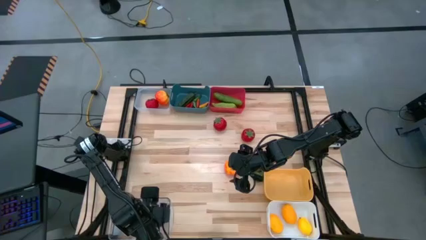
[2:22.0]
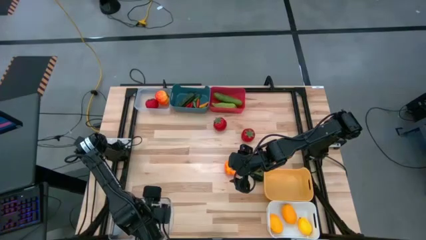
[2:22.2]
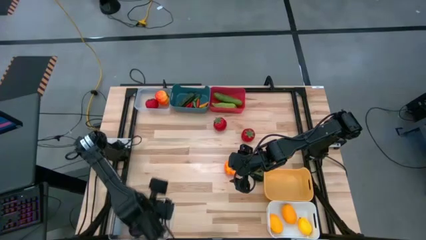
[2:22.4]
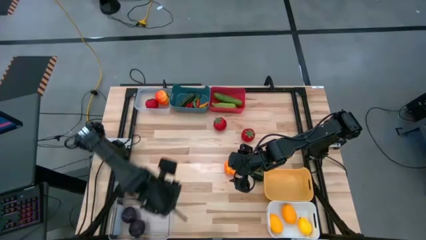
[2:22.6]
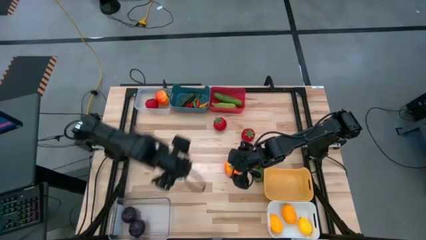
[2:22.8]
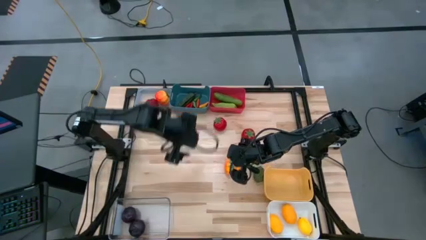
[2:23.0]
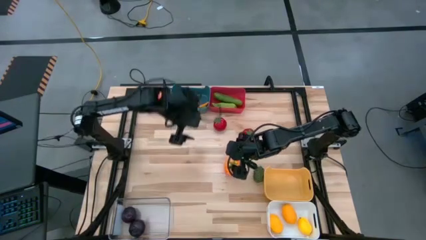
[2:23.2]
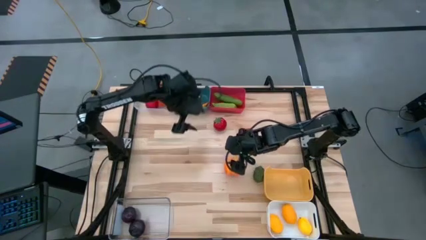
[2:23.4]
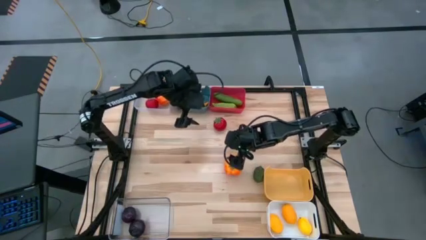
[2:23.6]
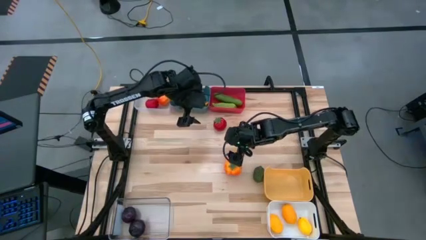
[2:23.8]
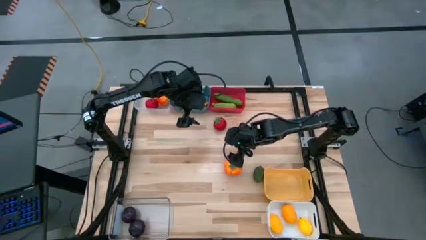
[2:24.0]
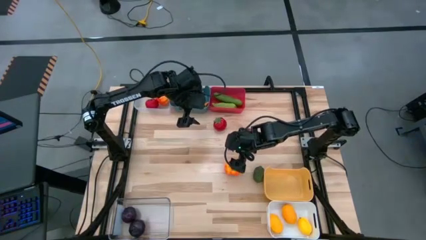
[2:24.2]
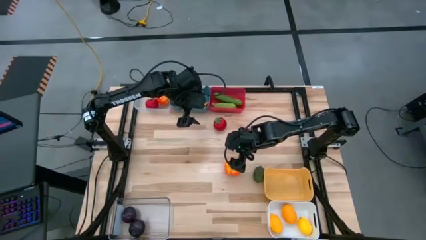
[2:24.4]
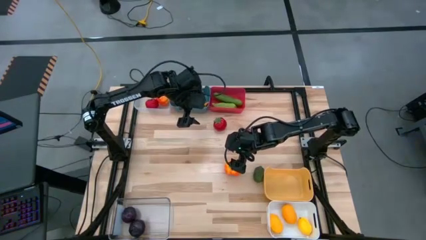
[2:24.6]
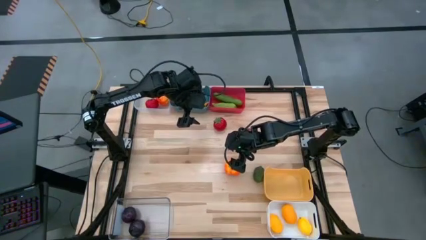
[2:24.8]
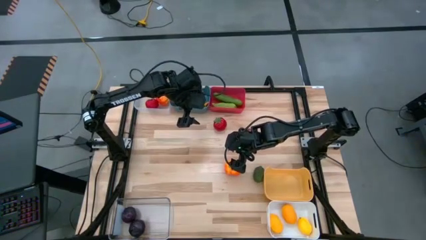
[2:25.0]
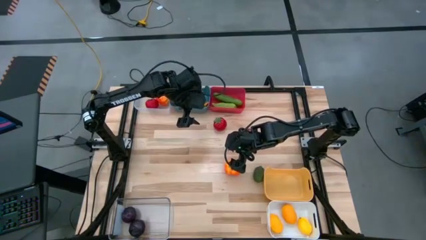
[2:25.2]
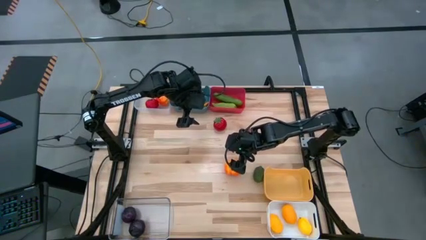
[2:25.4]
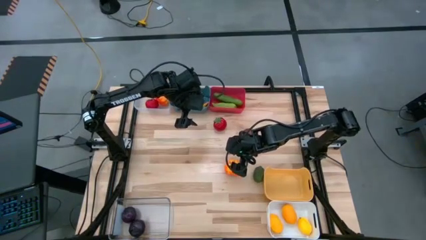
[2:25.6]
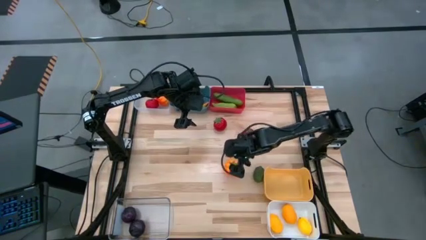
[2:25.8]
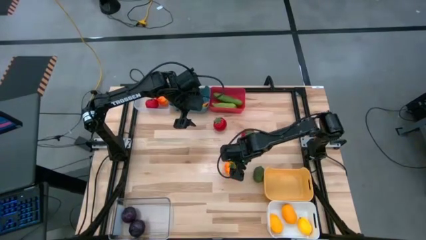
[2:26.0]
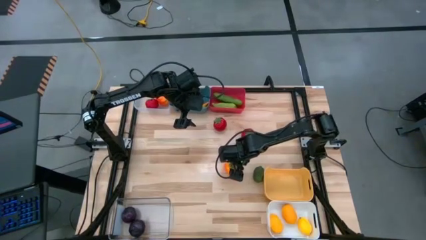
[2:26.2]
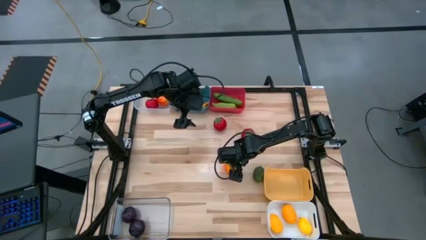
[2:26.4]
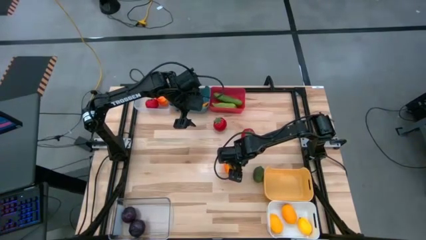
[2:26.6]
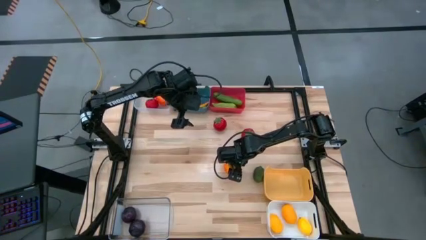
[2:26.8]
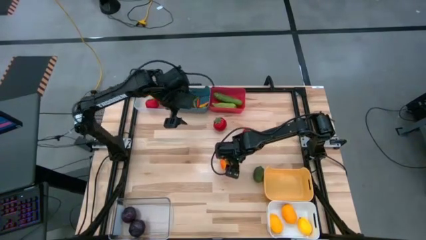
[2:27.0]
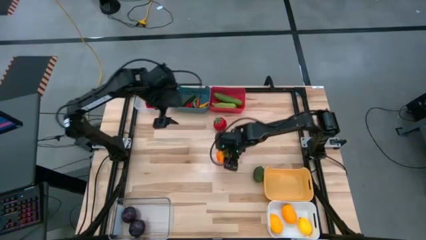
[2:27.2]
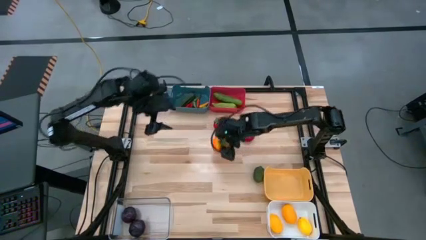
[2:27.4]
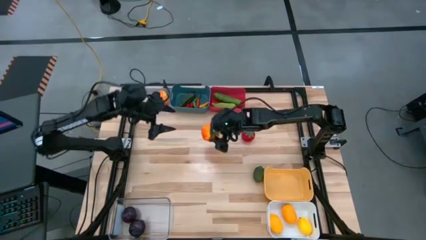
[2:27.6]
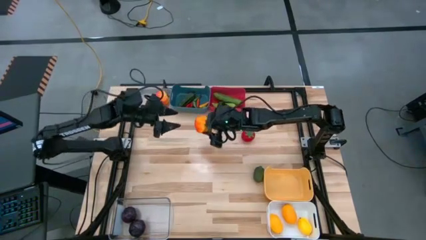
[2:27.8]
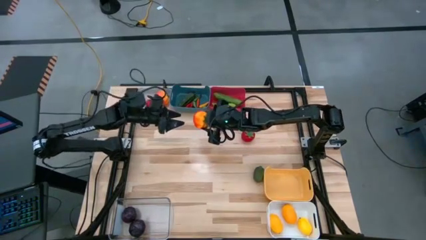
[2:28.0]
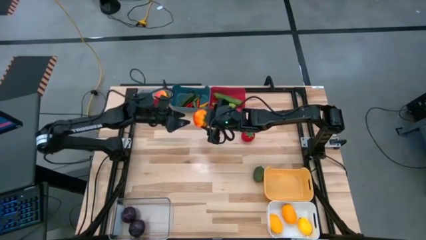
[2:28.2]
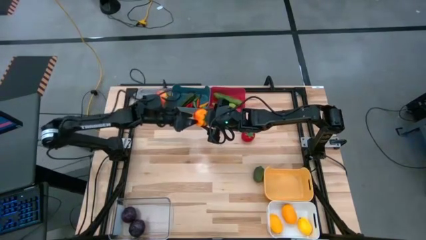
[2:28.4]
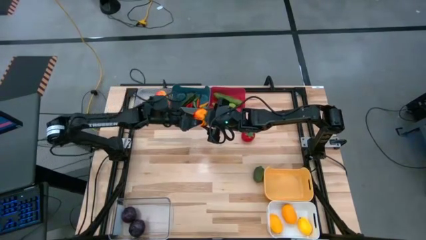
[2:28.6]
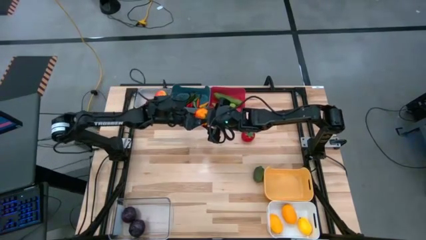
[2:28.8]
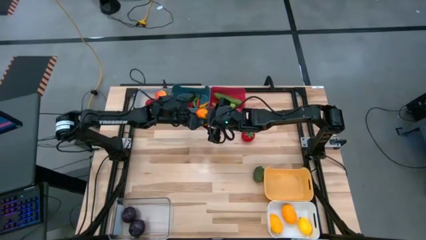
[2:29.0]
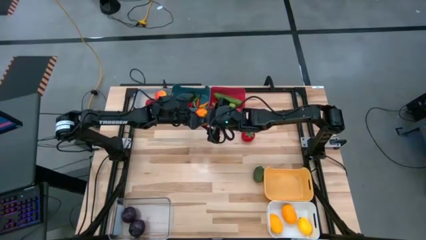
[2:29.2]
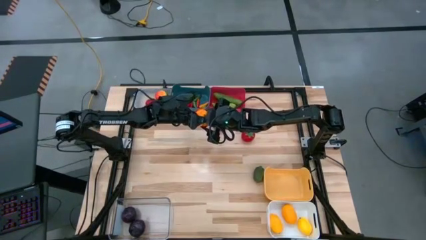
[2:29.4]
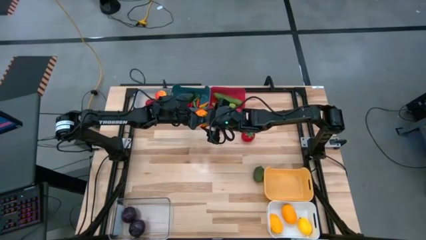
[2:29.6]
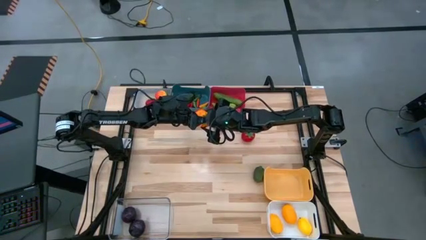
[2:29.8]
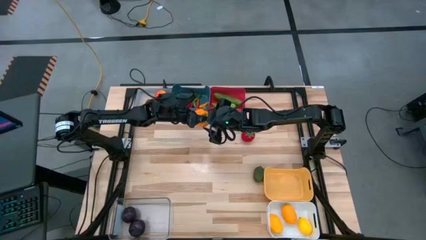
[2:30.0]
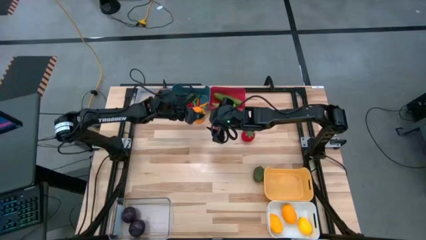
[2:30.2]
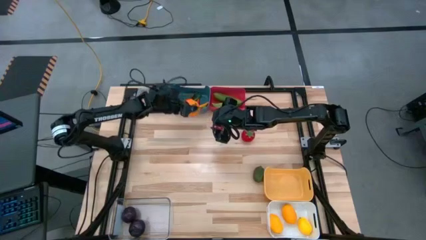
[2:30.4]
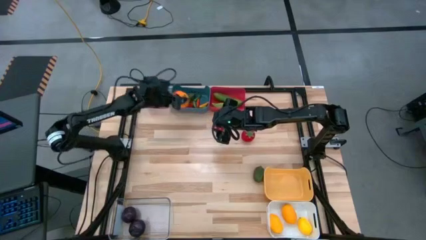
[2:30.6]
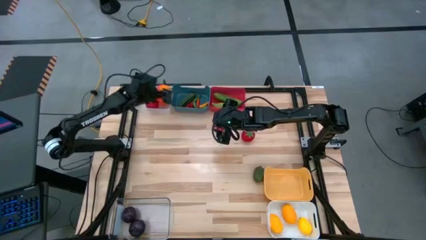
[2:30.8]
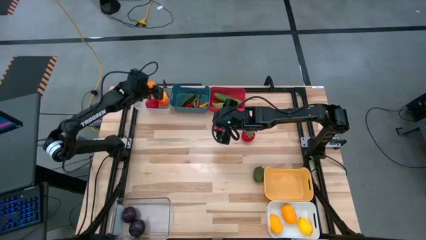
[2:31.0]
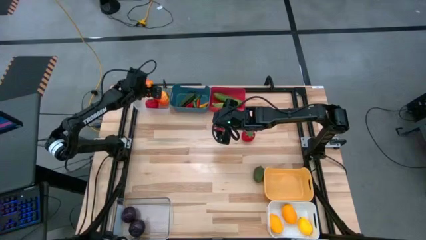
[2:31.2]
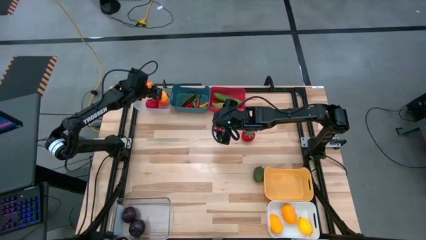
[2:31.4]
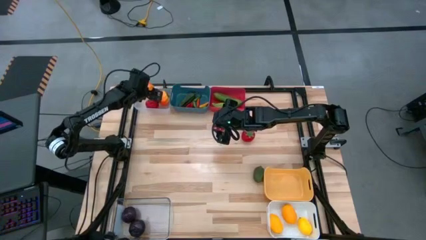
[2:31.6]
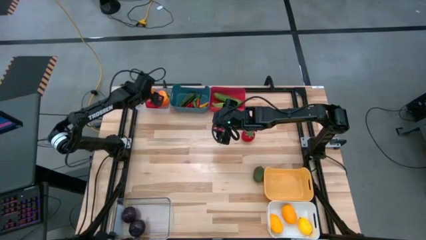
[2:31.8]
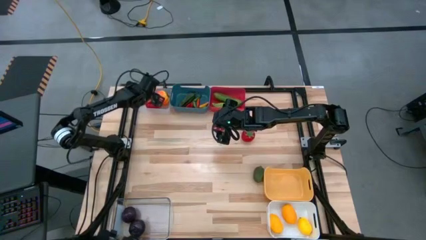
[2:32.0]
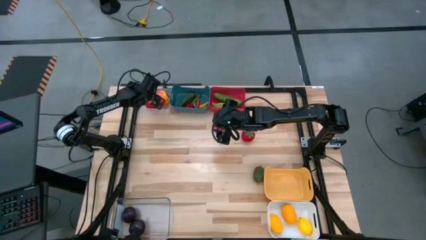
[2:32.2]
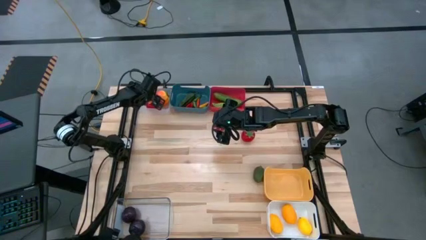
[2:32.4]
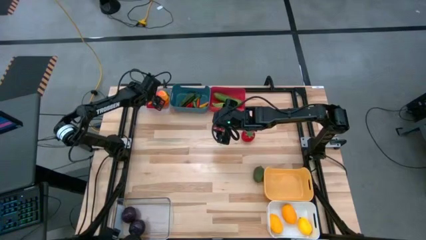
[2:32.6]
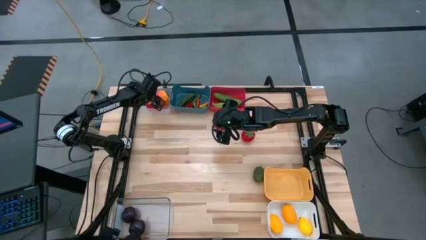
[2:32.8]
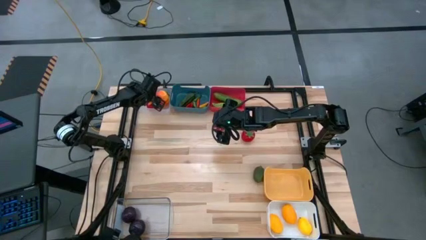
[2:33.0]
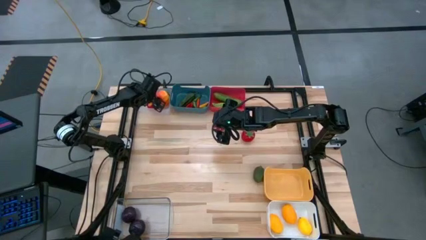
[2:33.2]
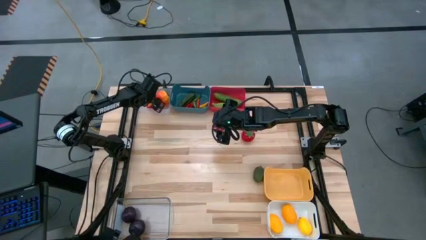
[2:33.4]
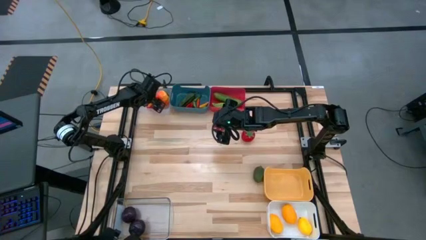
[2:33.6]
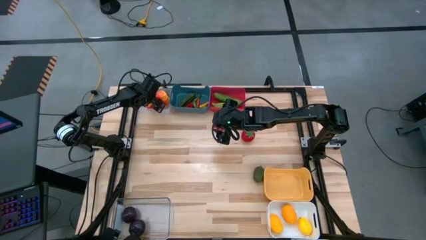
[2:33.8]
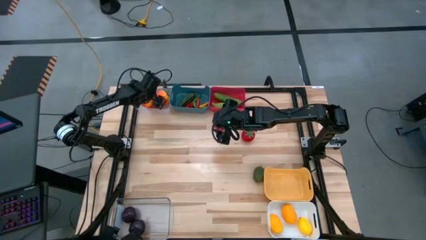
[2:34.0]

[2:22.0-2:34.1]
Task: Sort produce into baskets
Put the orange tomato into the top transparent bin
